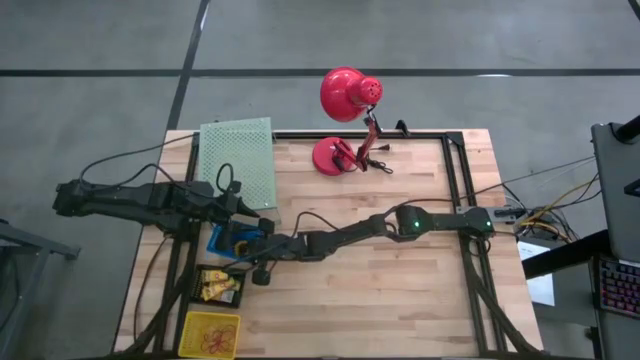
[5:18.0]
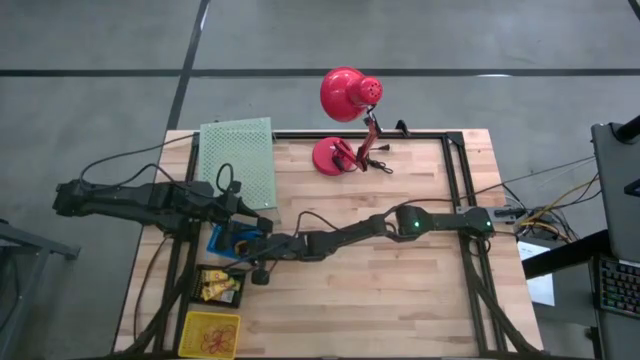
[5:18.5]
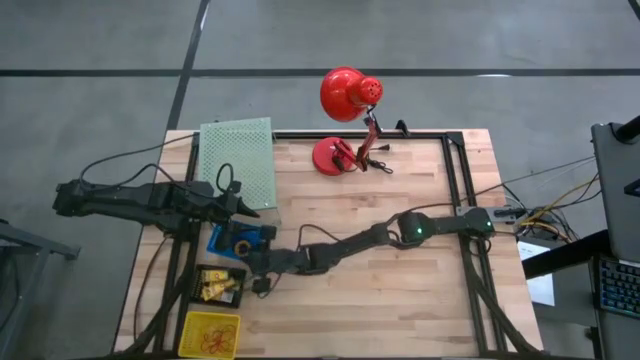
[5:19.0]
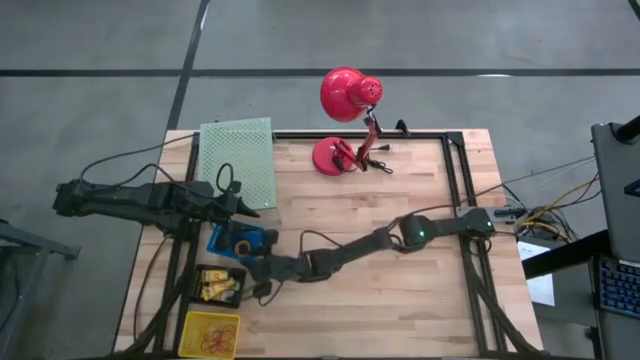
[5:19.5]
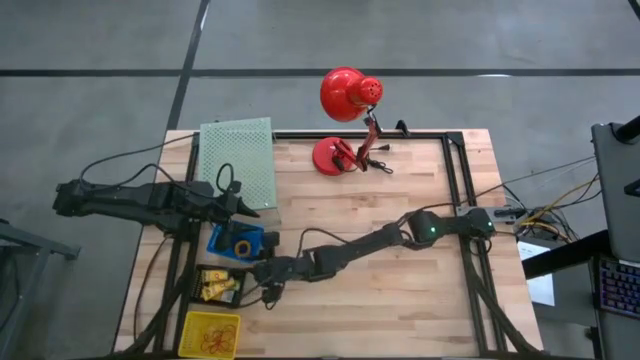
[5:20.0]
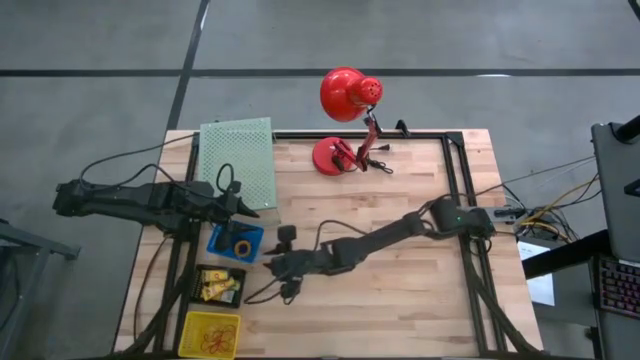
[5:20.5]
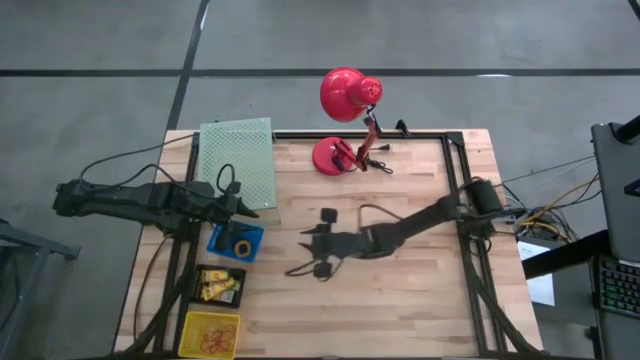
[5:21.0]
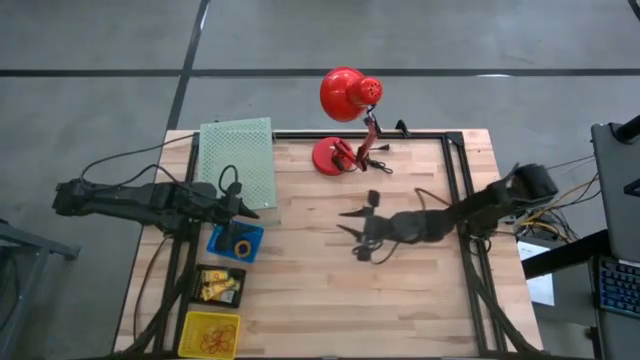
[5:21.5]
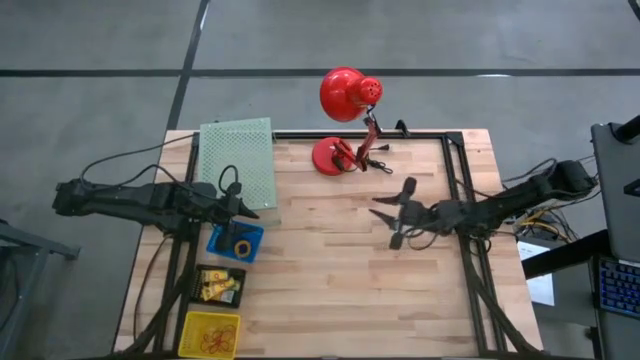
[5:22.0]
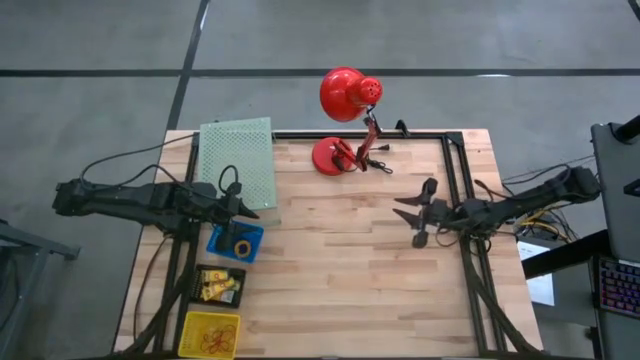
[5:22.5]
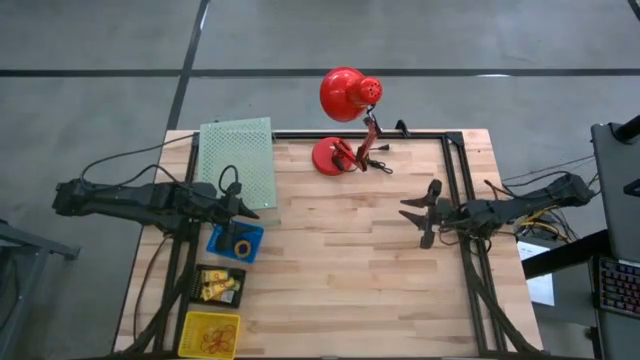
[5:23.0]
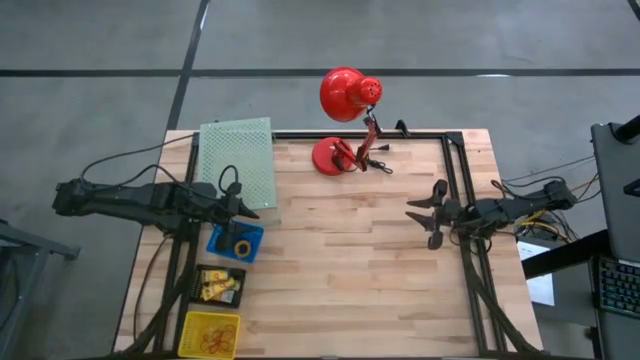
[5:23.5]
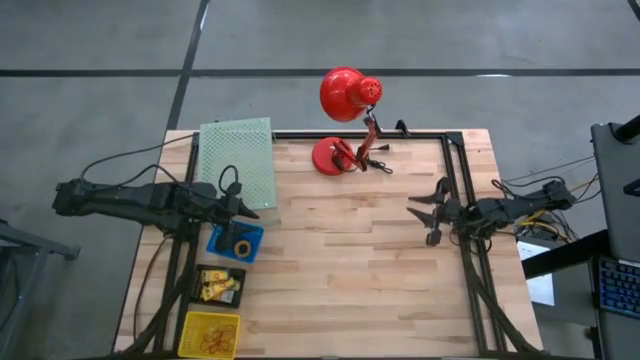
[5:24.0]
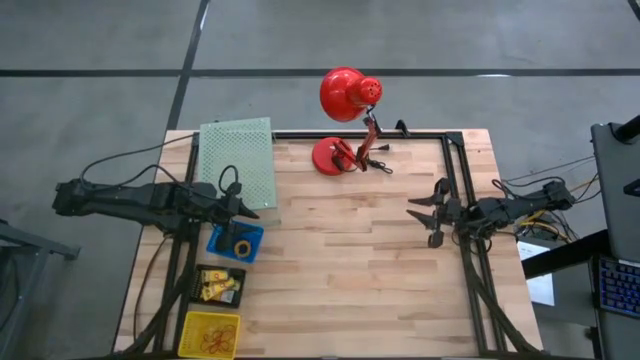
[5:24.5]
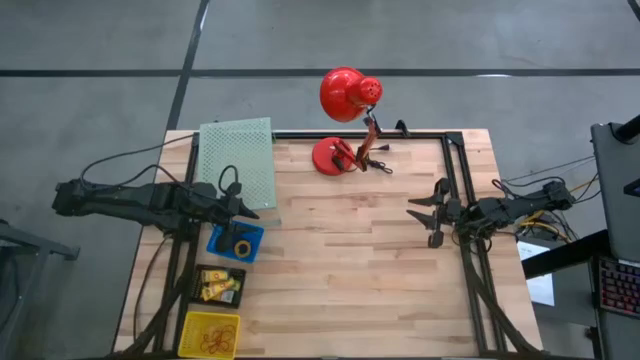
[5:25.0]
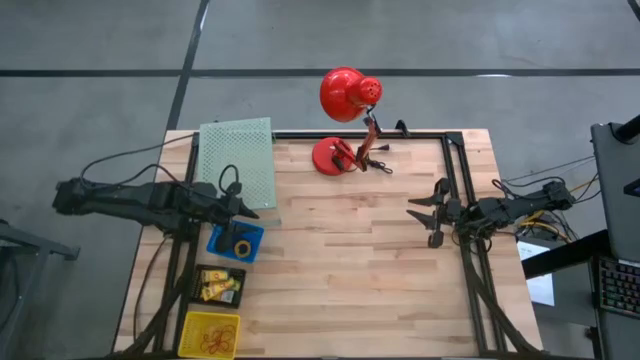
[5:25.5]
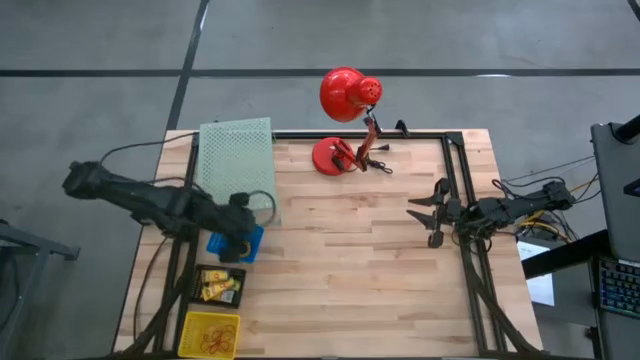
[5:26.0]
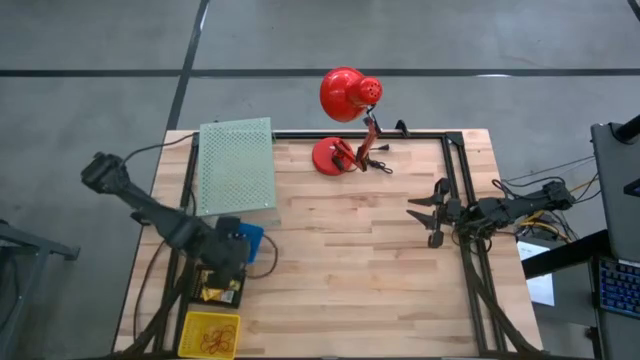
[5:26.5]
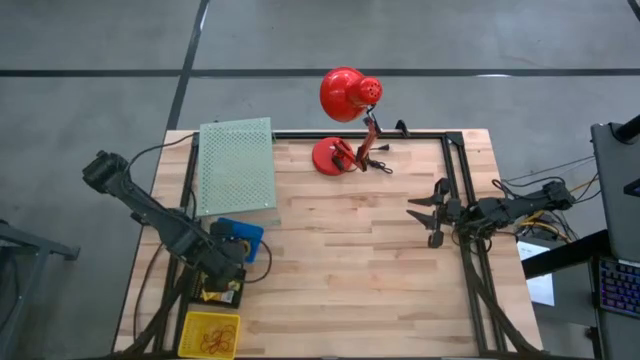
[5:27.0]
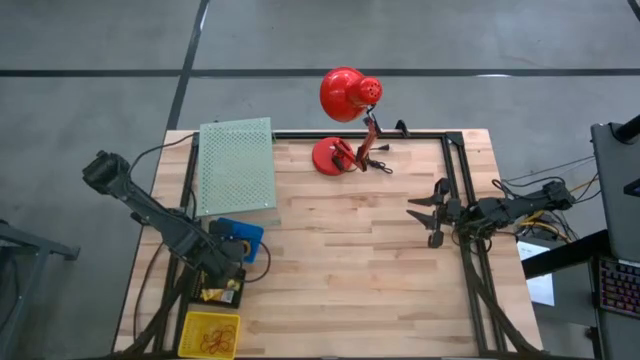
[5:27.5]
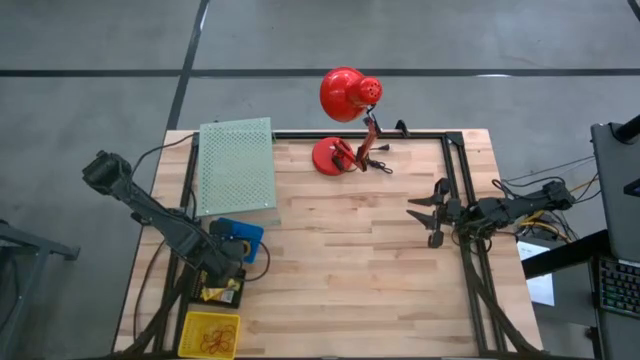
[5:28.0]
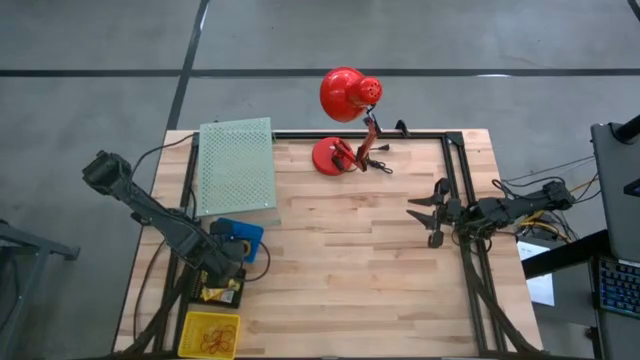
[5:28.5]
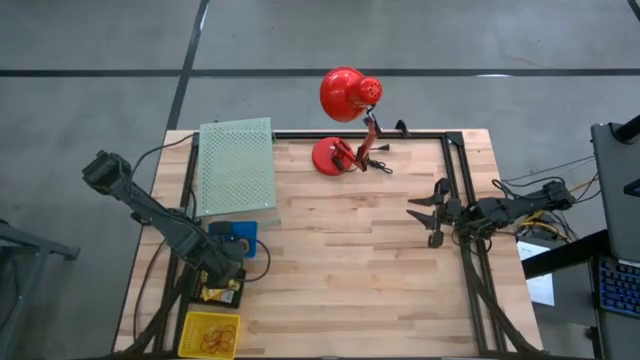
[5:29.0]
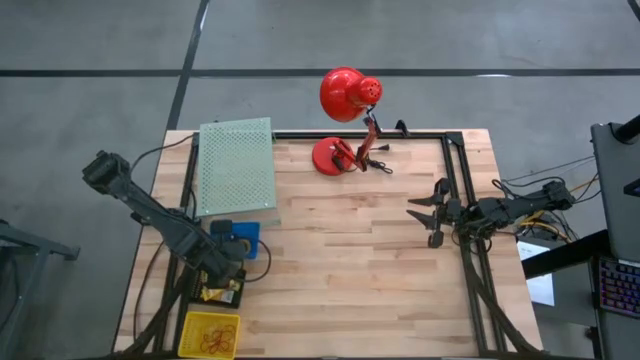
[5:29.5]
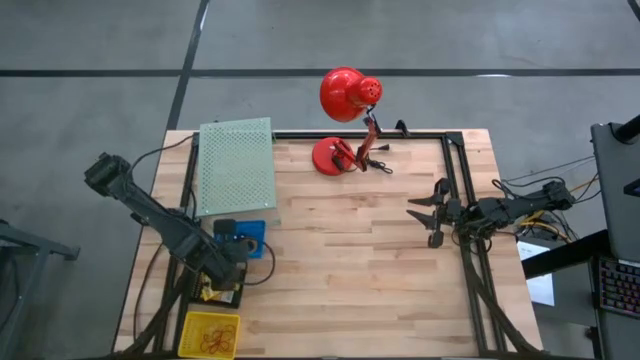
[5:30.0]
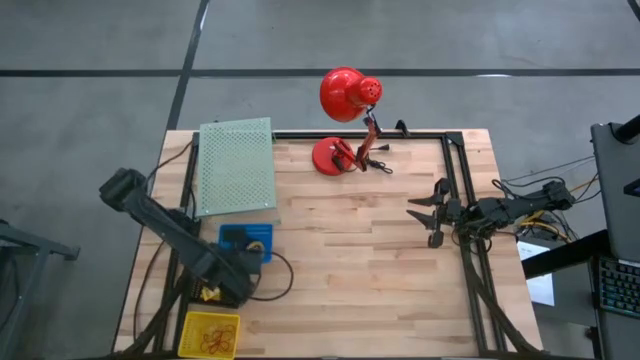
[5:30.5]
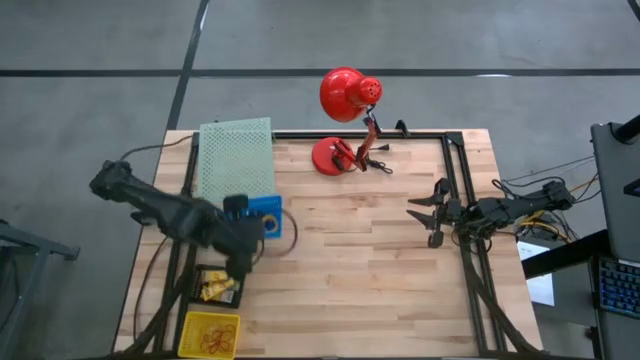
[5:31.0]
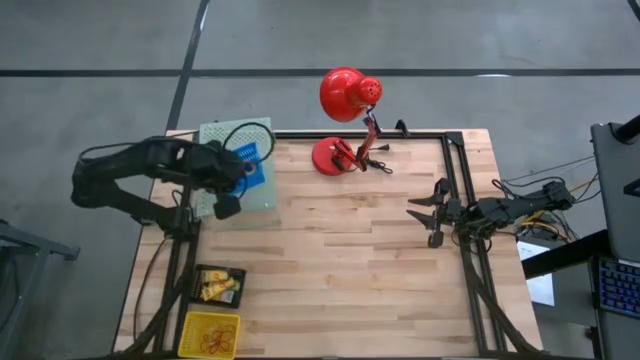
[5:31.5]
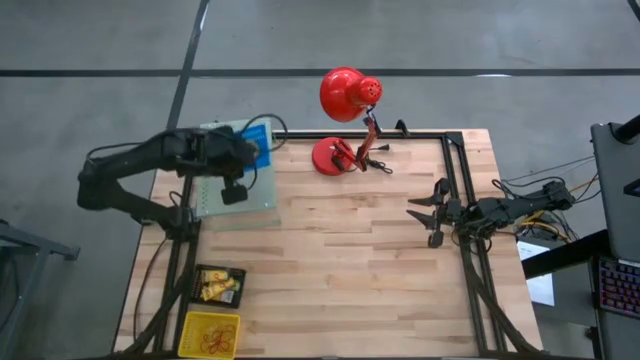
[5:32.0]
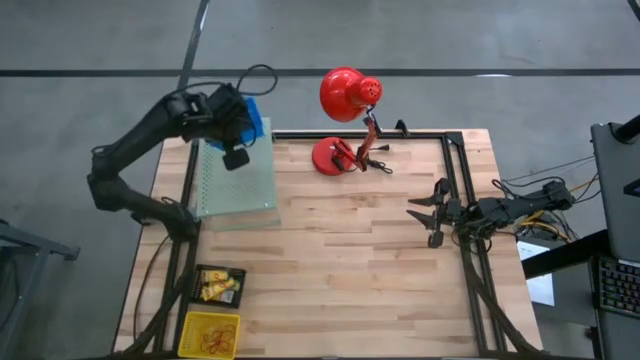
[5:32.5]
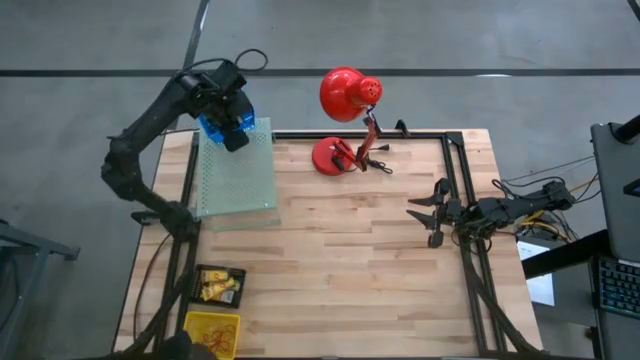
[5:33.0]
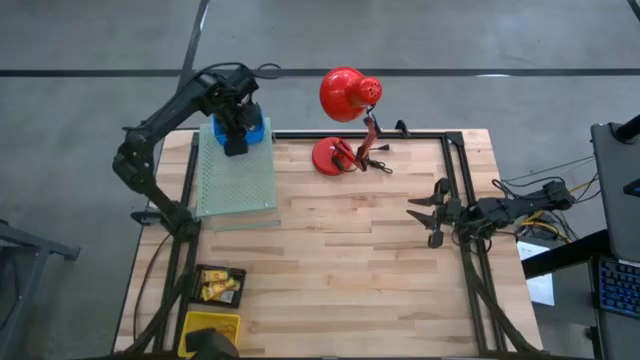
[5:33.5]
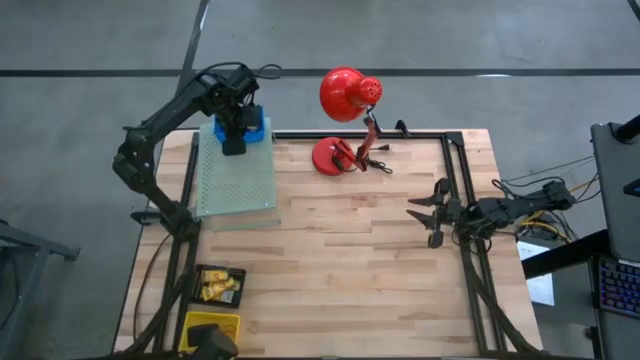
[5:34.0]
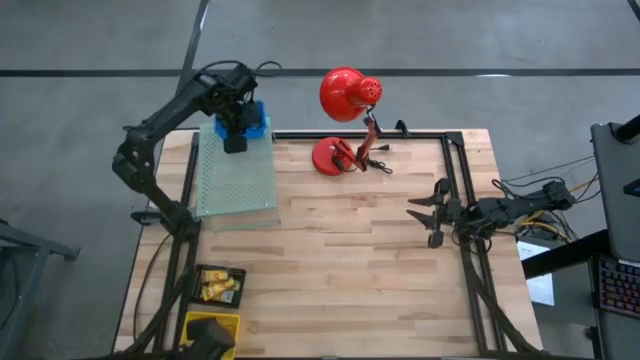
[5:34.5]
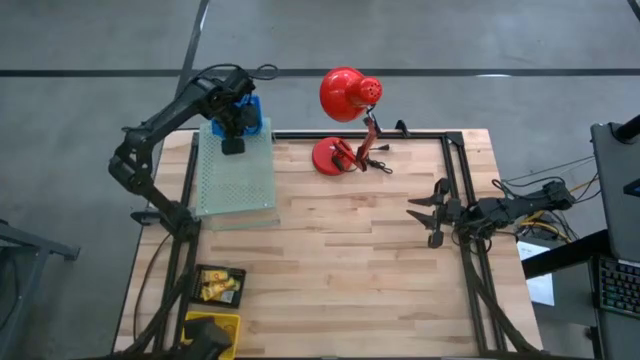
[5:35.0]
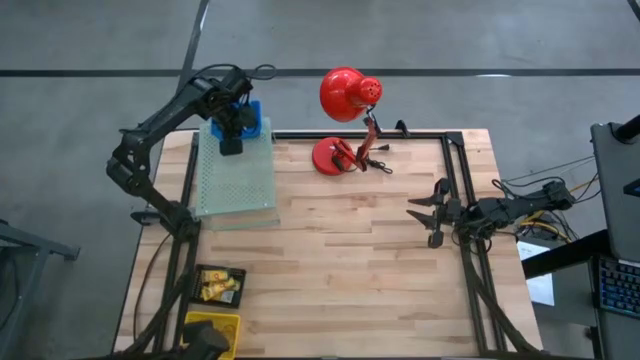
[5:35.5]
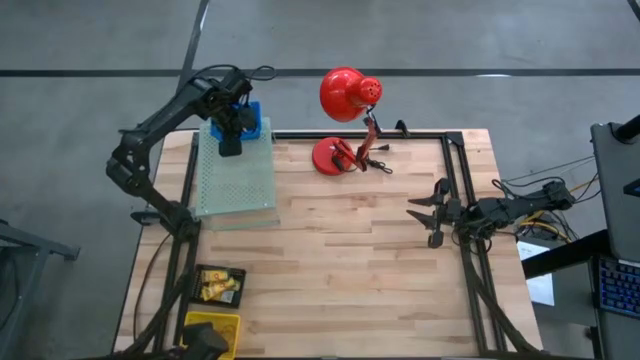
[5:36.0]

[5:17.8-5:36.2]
Task: Pick & Place Office Desk Supplies
Put the blue bin on the shelf

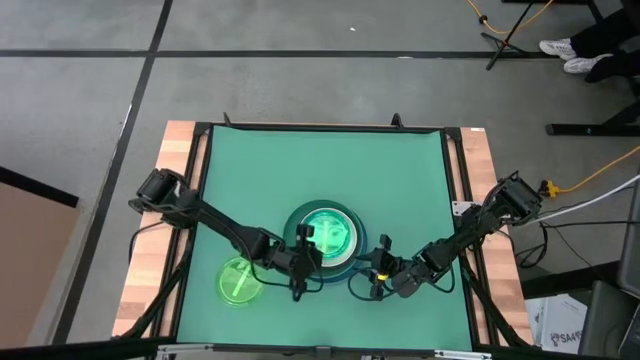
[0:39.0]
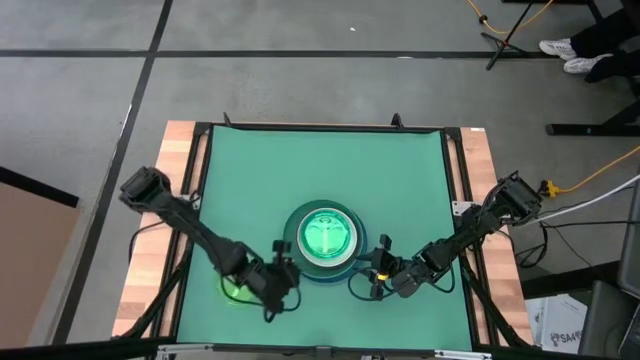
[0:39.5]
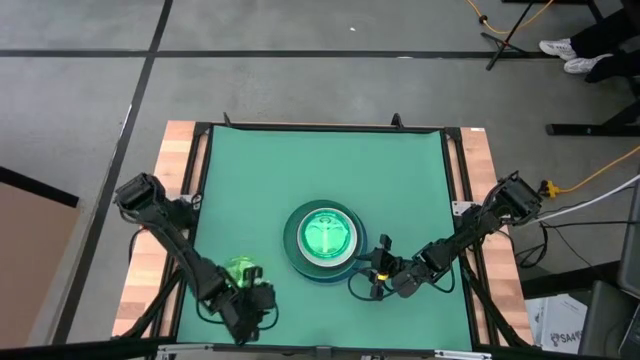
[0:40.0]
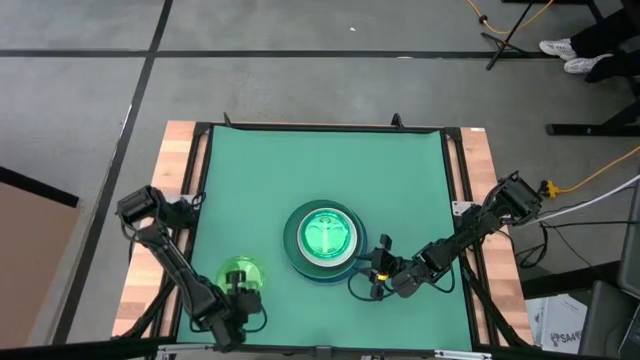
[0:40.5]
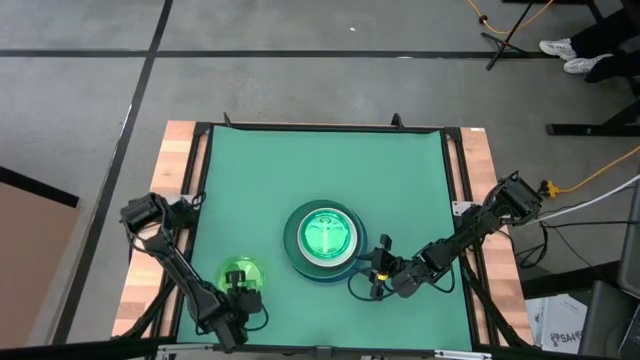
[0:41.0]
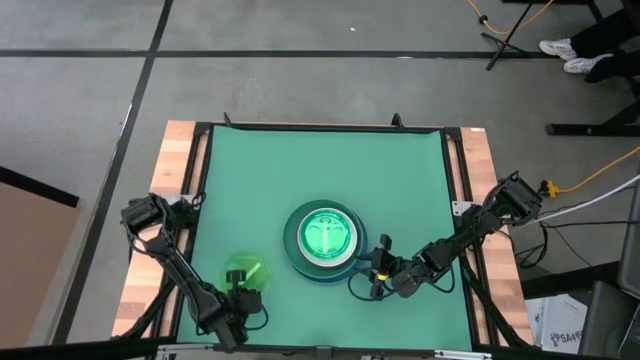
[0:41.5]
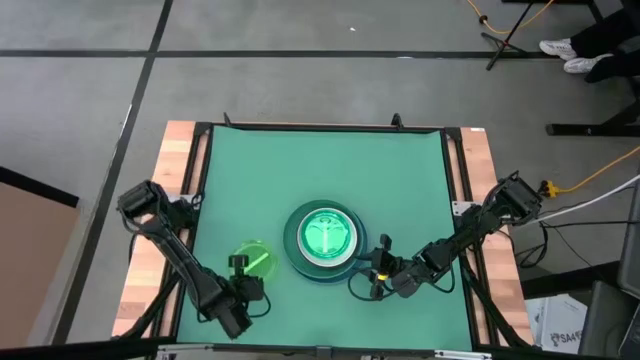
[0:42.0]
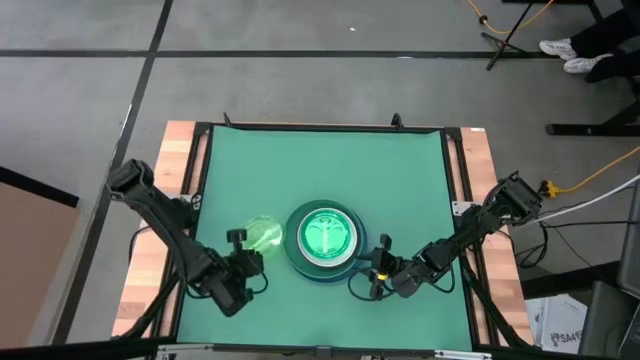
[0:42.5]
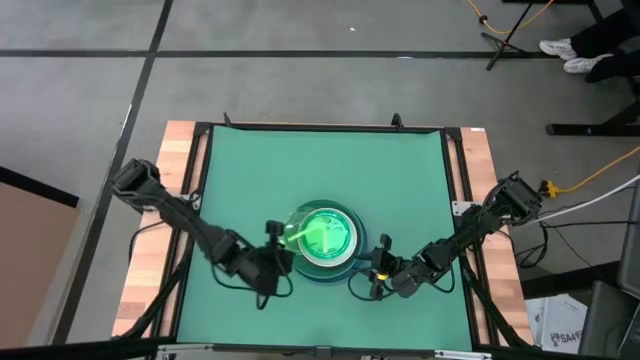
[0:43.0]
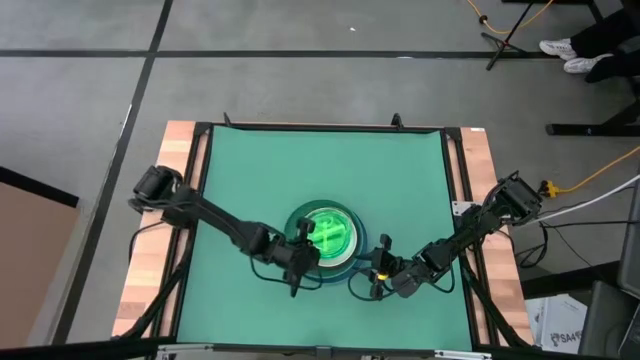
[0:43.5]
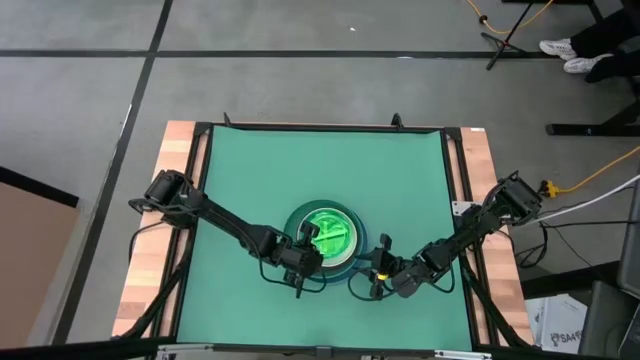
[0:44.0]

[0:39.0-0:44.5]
Task: Stack plastic plates
Stack the green plate on top of the green plate
